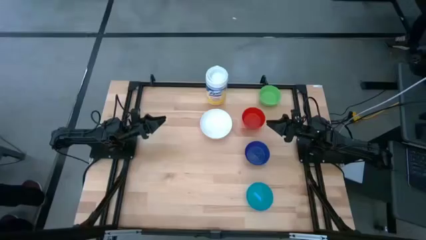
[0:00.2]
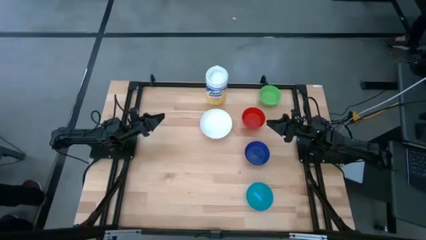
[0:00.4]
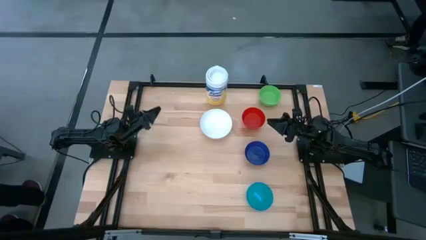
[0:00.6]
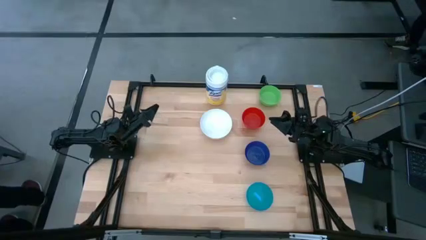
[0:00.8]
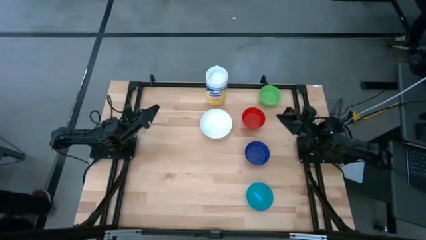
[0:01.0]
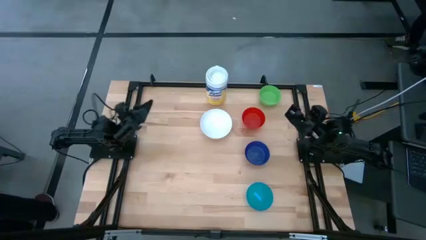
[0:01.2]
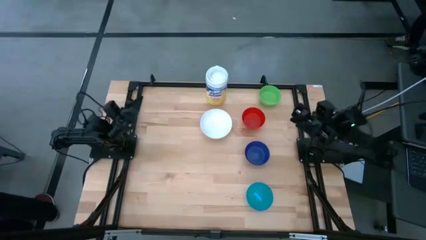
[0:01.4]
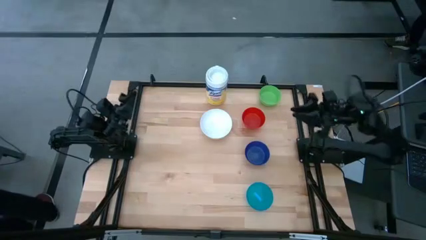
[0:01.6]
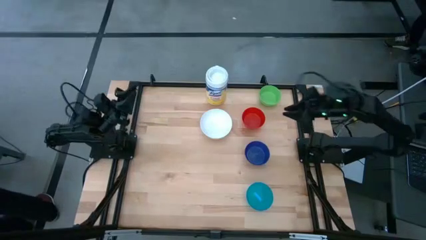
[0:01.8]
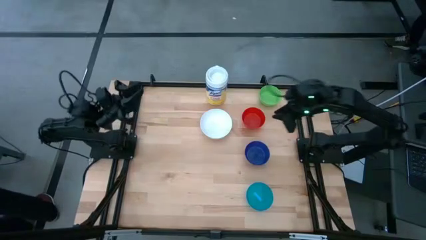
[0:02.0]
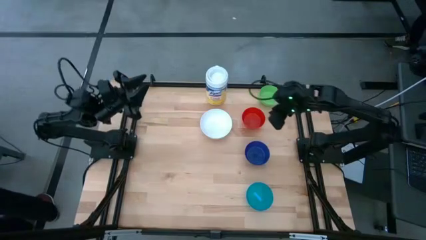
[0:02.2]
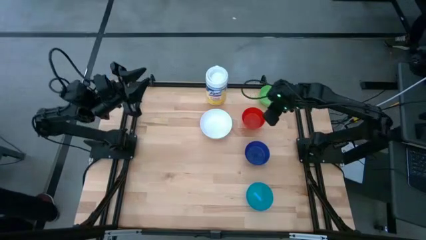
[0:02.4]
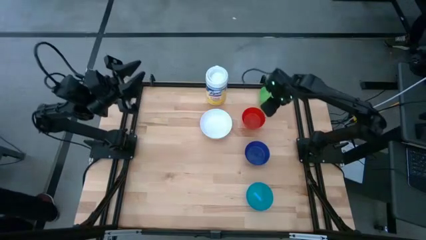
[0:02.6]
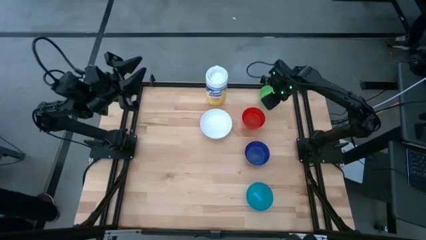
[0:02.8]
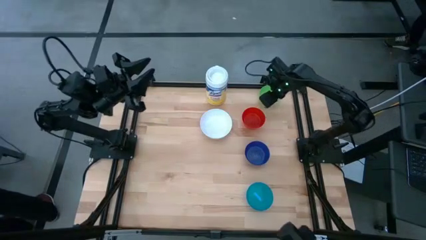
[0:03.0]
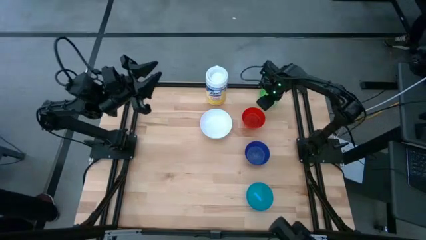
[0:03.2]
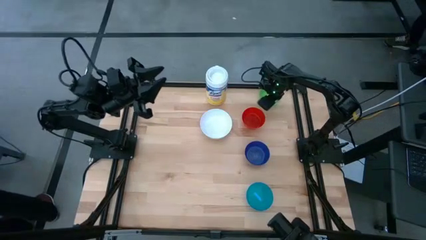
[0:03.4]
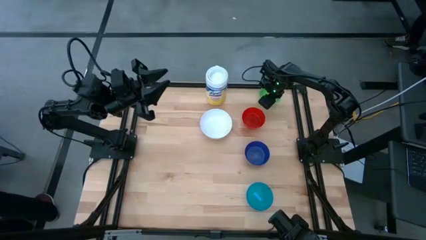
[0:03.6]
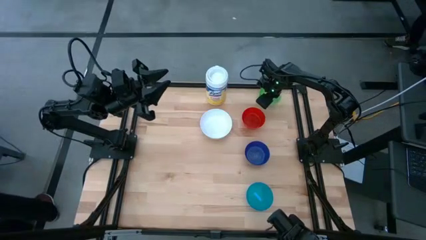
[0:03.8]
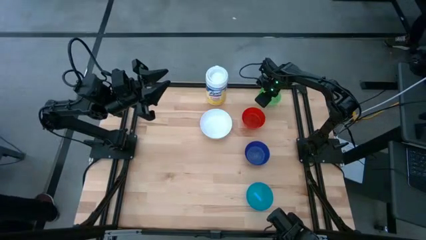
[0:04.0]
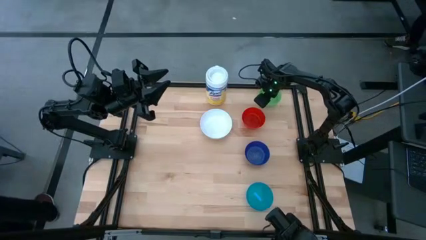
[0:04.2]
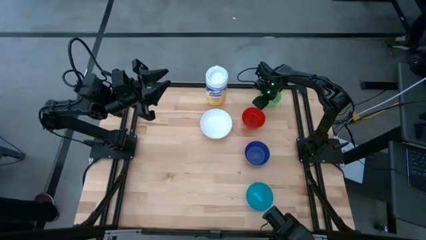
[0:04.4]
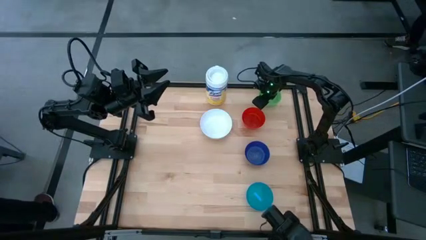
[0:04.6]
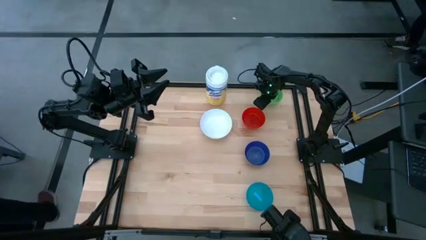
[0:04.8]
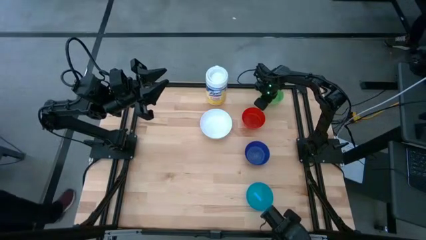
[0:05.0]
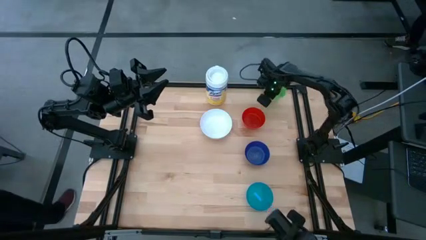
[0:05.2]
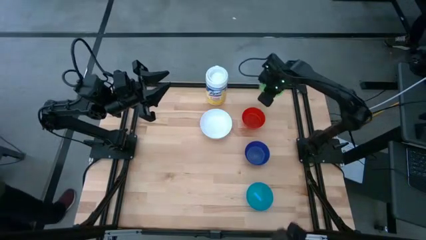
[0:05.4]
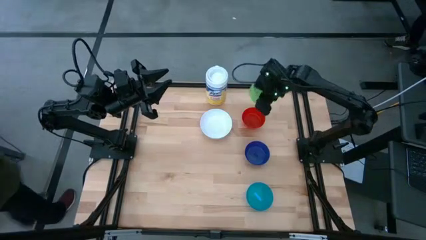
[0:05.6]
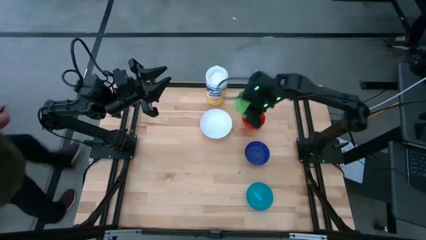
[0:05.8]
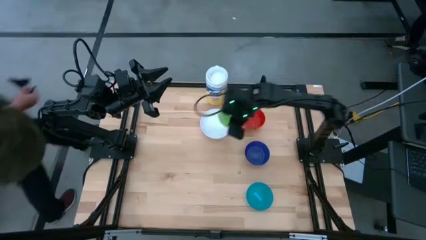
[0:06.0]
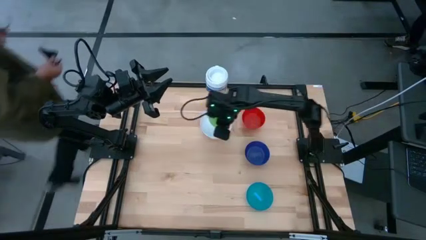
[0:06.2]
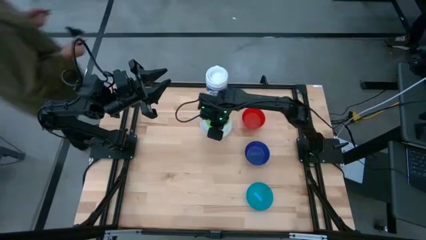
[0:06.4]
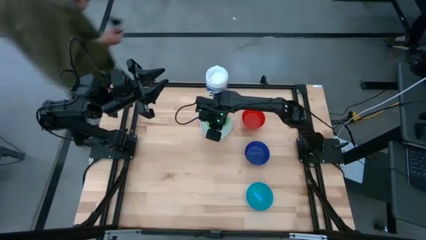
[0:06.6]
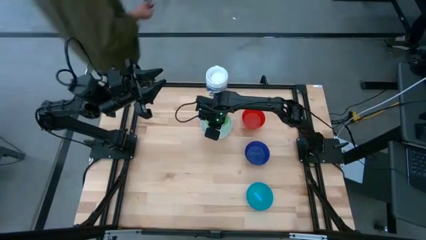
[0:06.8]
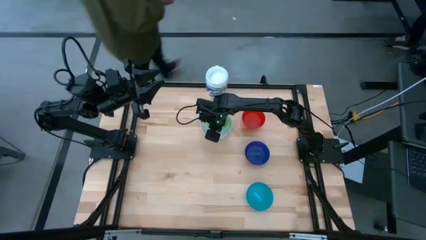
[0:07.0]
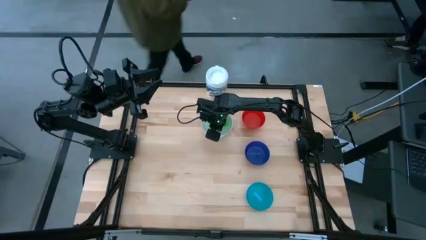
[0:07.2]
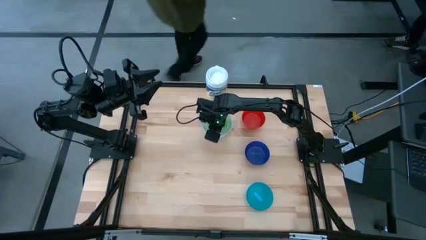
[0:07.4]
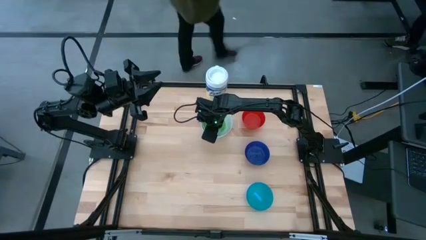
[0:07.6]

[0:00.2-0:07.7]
Stack the green bowl on the white bowl

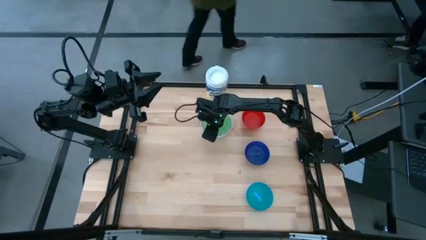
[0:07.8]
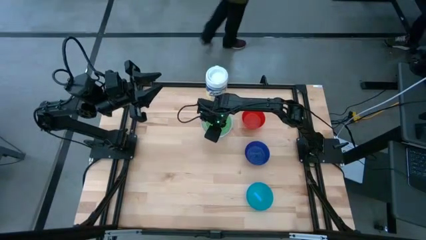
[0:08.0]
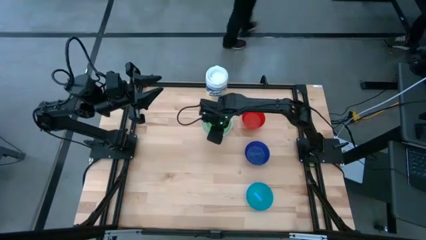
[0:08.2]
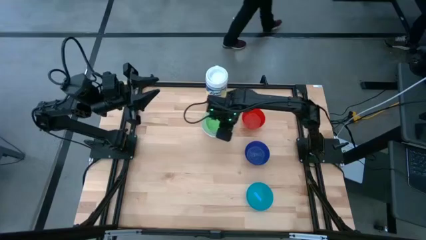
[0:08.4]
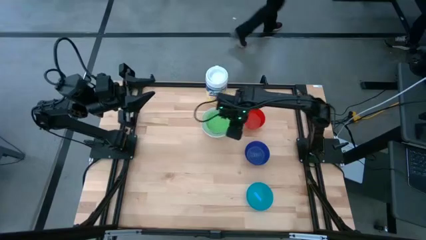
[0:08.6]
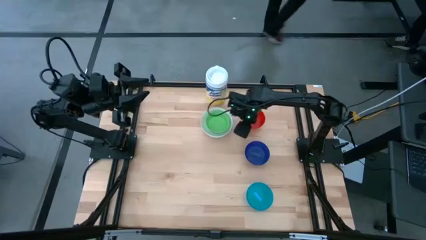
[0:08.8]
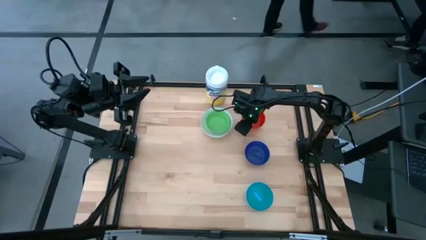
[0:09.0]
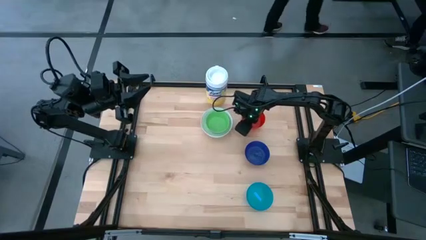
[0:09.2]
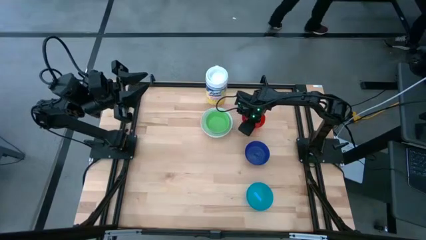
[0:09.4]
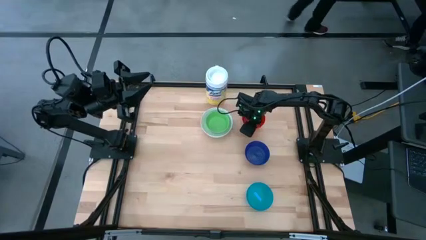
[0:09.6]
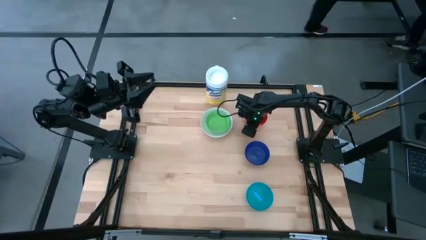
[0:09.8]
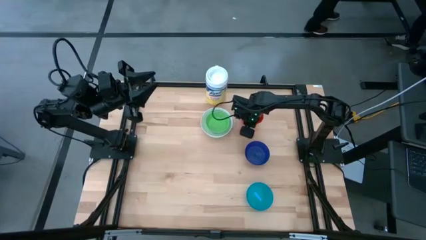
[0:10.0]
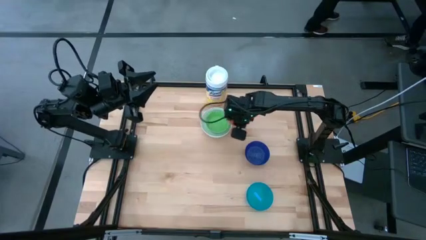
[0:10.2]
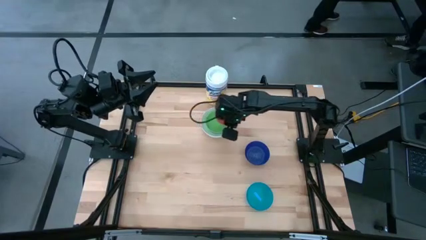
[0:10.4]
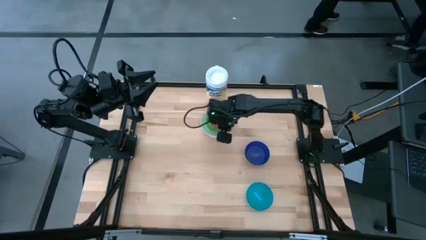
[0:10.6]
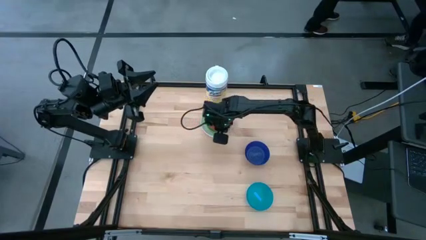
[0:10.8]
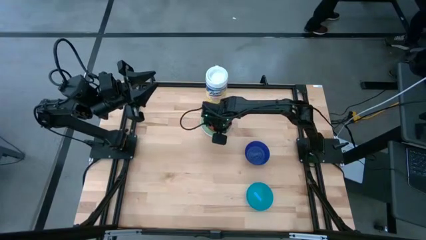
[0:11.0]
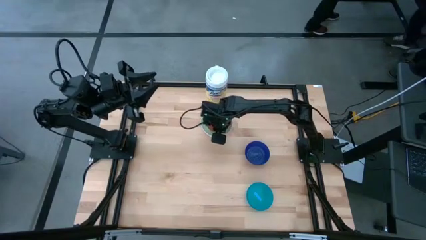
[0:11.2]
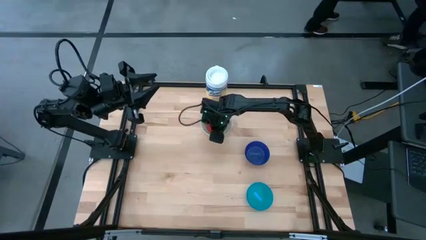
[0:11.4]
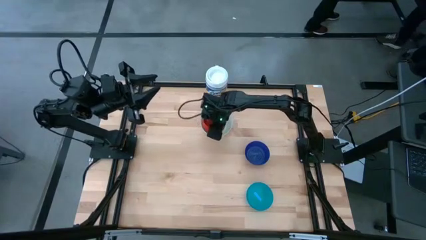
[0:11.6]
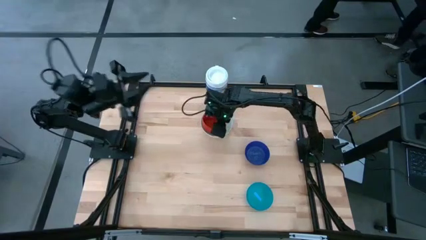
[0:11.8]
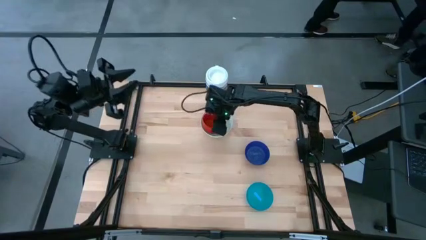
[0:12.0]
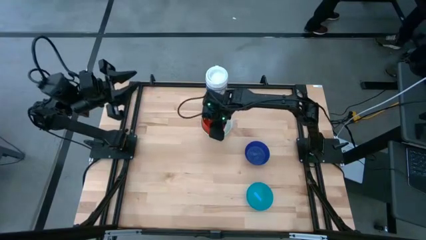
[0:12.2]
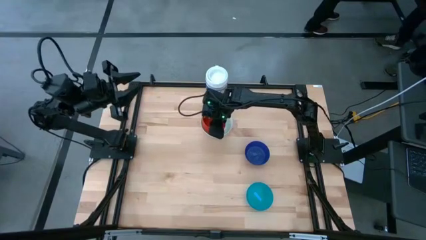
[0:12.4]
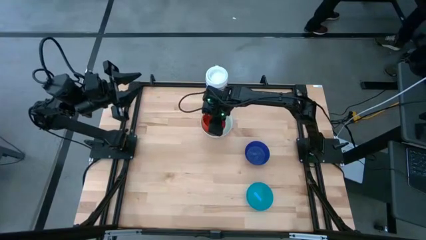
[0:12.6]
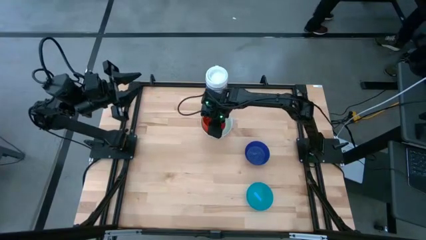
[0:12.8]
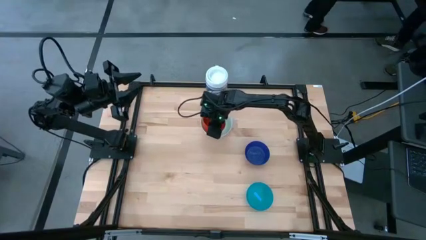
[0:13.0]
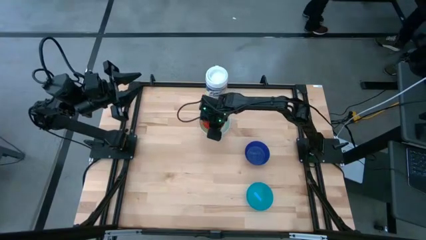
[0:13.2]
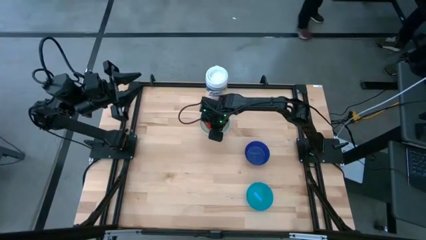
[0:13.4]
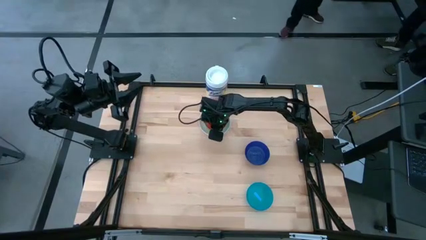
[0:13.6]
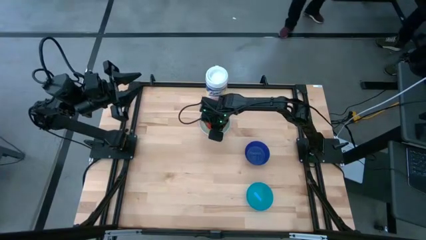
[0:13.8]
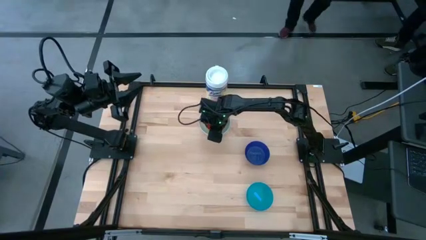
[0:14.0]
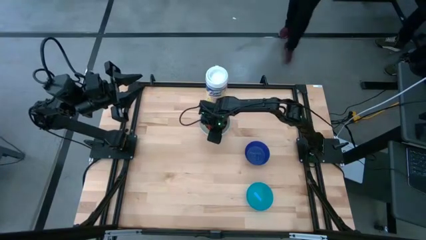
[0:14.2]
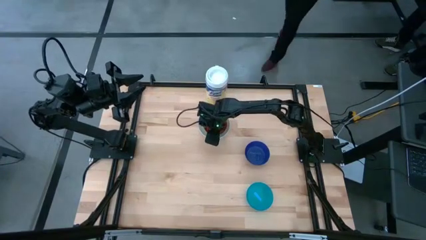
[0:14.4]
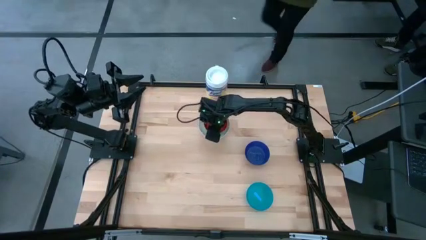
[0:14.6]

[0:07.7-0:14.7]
Stack the red bowl on the green bowl

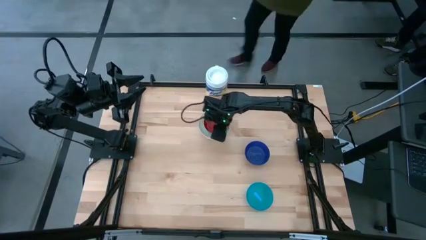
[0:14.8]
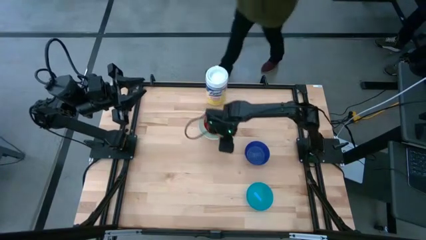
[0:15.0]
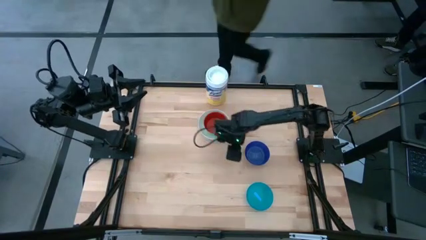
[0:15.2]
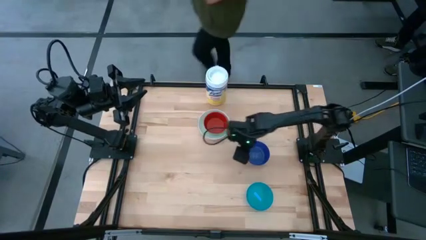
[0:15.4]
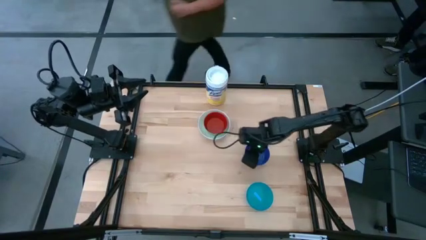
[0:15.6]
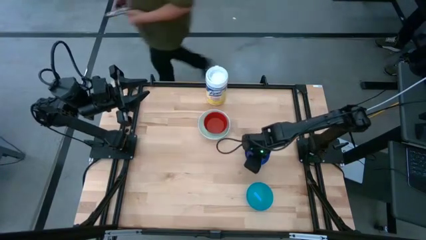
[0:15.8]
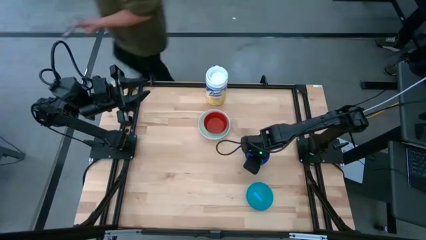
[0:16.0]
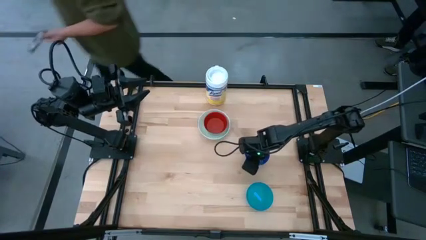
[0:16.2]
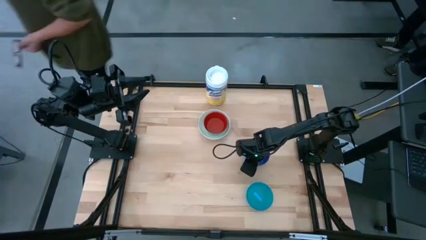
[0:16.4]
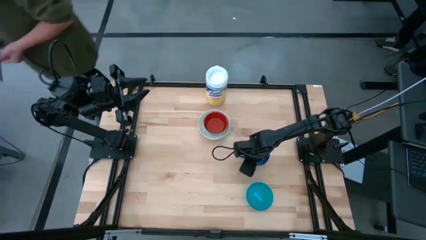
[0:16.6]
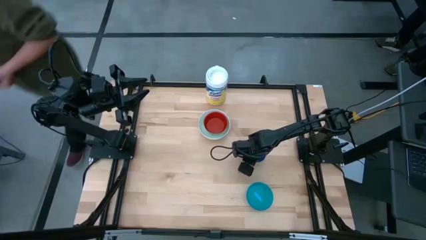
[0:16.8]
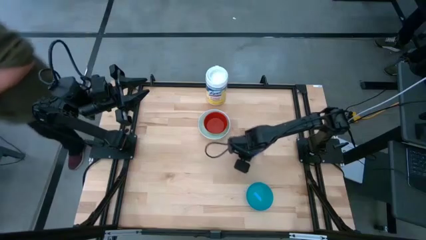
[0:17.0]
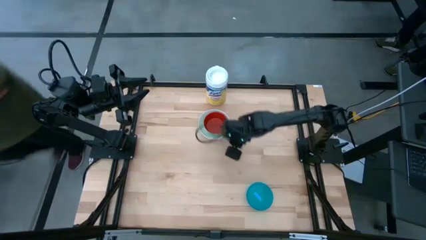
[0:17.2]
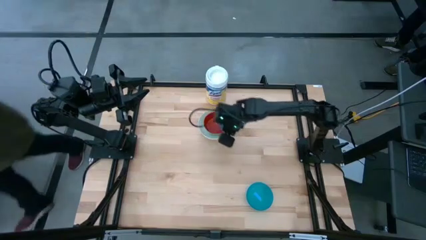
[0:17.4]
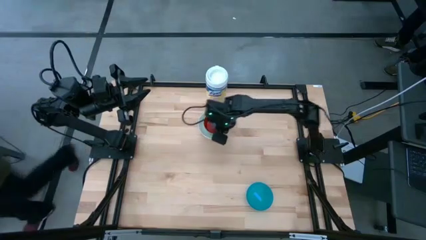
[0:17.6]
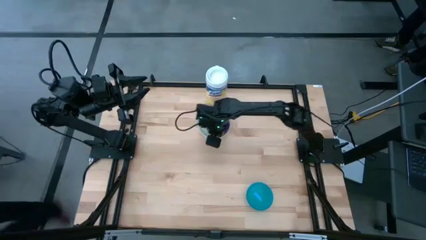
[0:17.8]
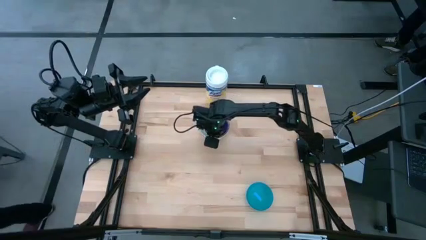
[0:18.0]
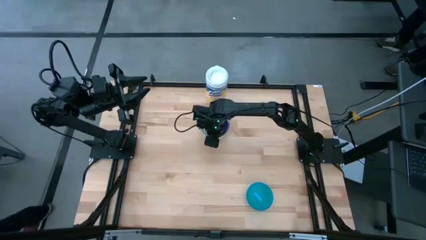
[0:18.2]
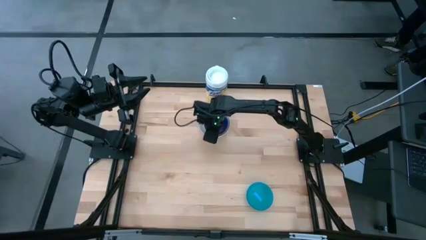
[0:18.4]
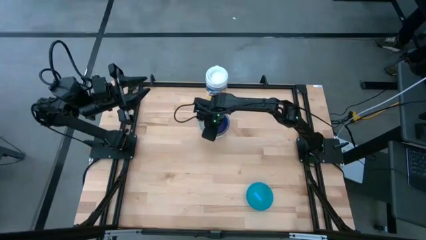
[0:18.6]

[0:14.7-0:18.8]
Stack the blue bowl on the red bowl
